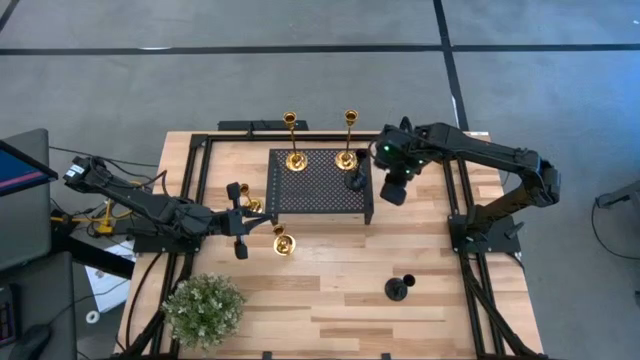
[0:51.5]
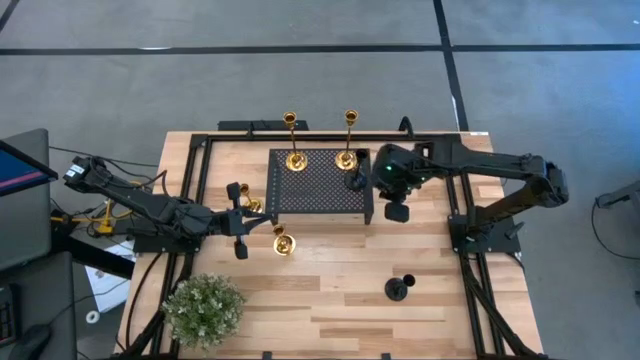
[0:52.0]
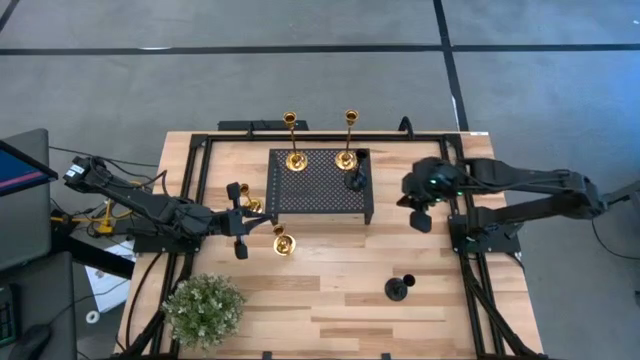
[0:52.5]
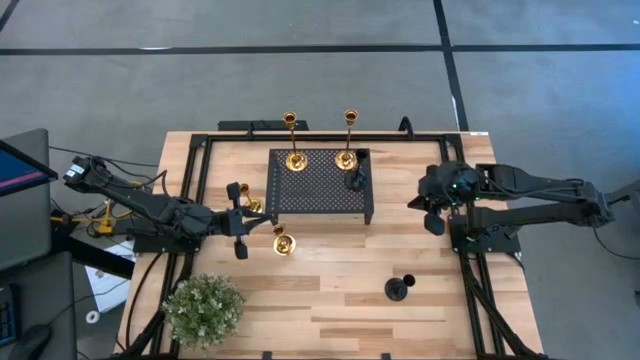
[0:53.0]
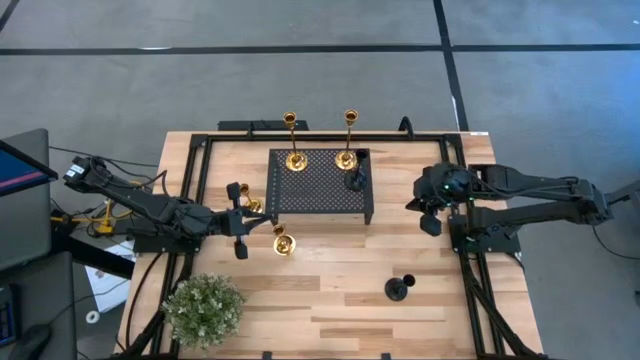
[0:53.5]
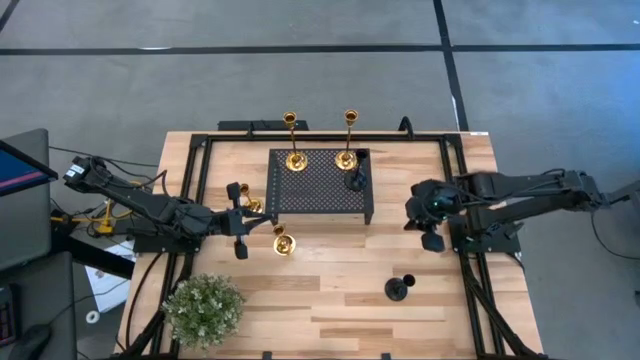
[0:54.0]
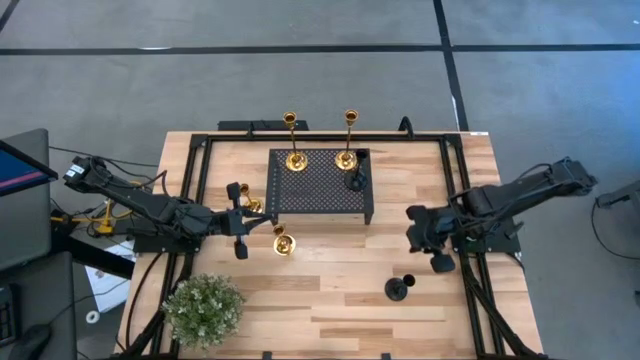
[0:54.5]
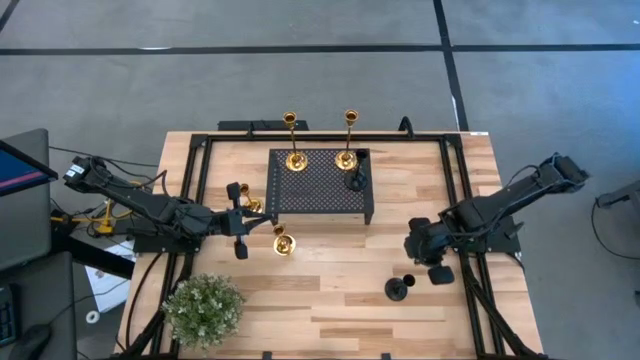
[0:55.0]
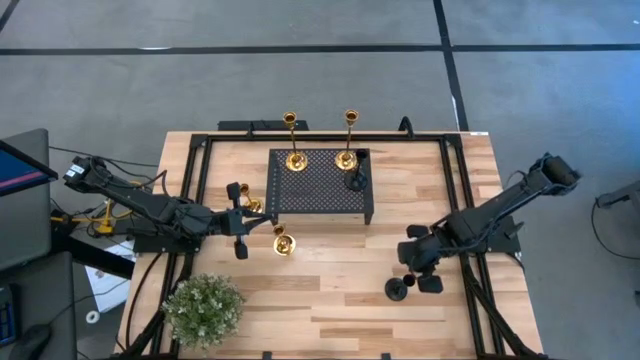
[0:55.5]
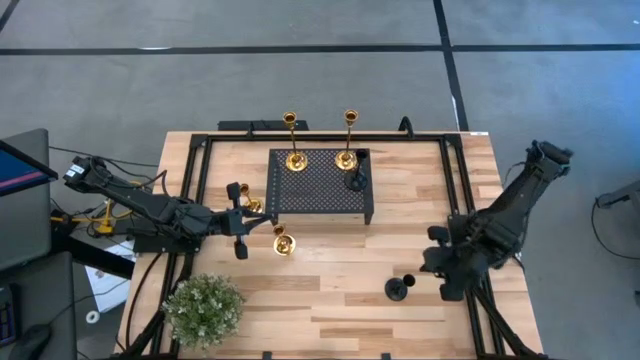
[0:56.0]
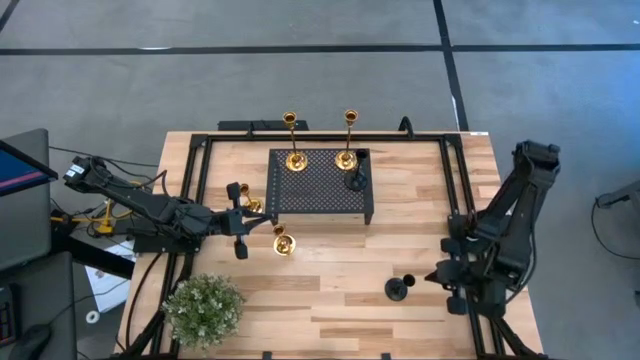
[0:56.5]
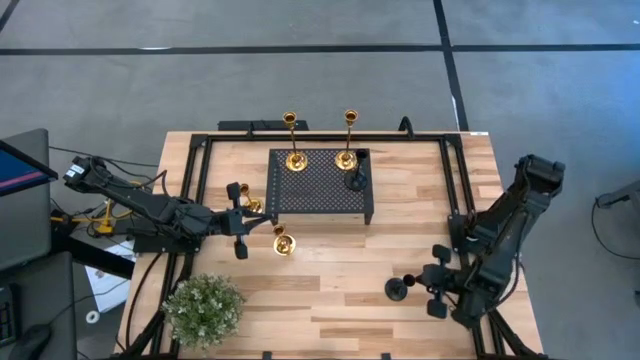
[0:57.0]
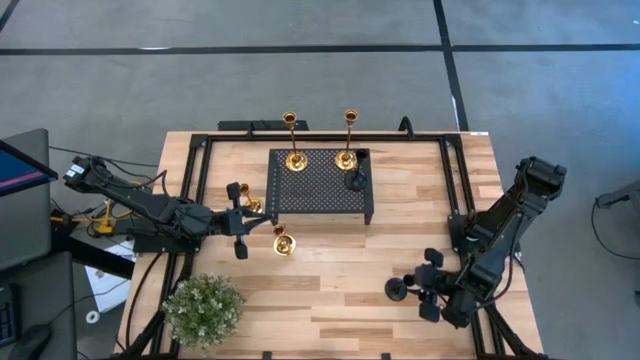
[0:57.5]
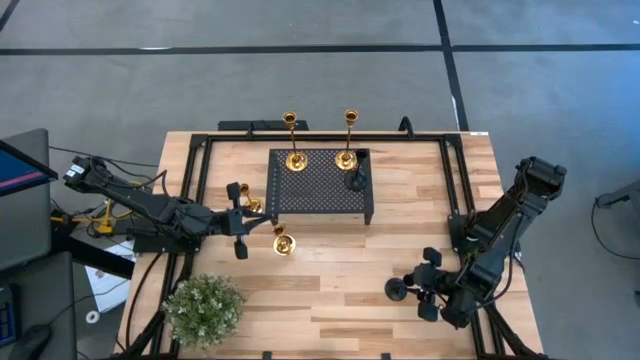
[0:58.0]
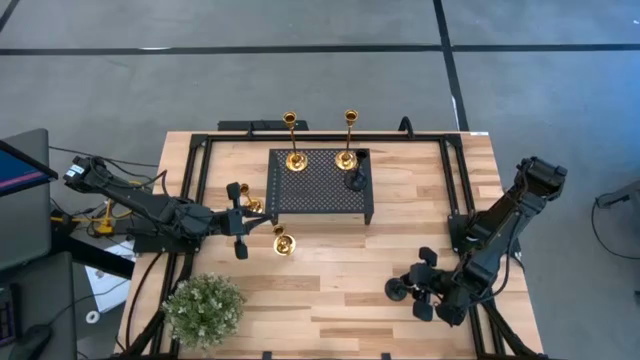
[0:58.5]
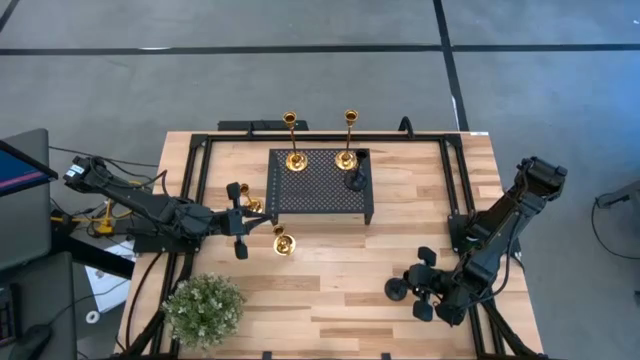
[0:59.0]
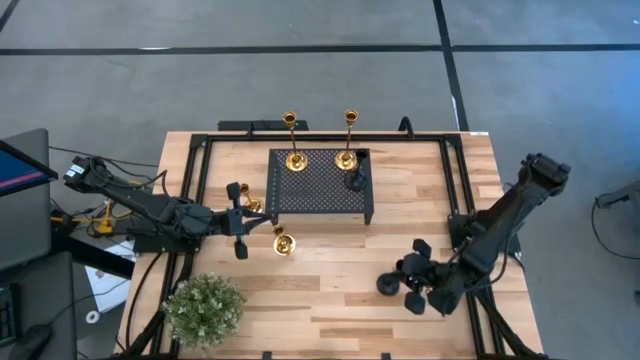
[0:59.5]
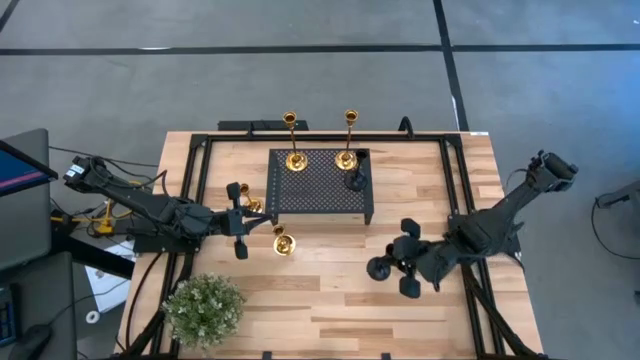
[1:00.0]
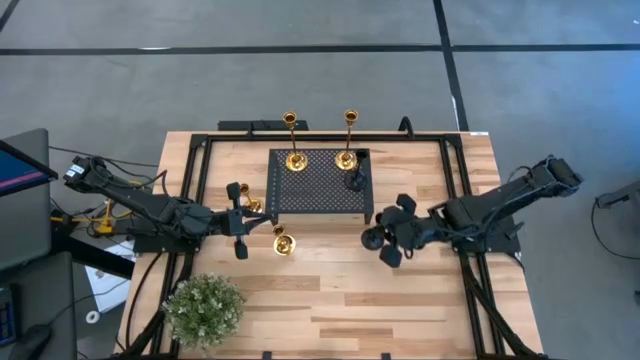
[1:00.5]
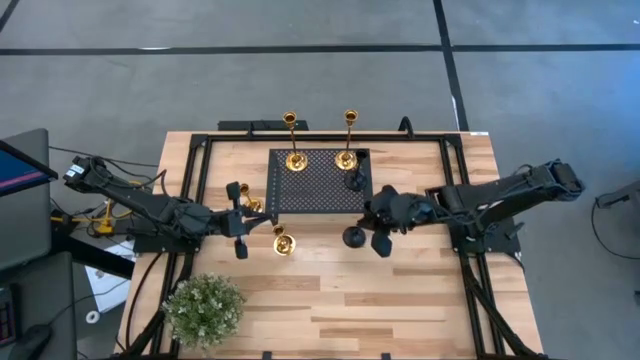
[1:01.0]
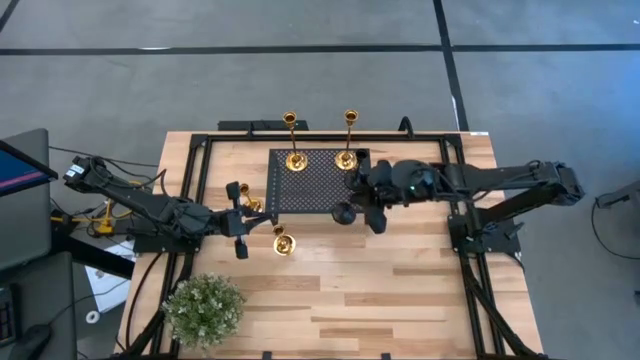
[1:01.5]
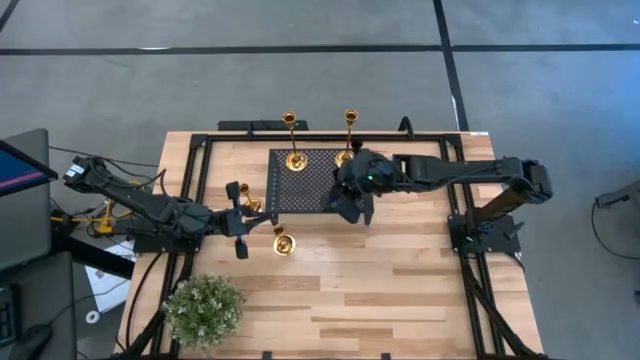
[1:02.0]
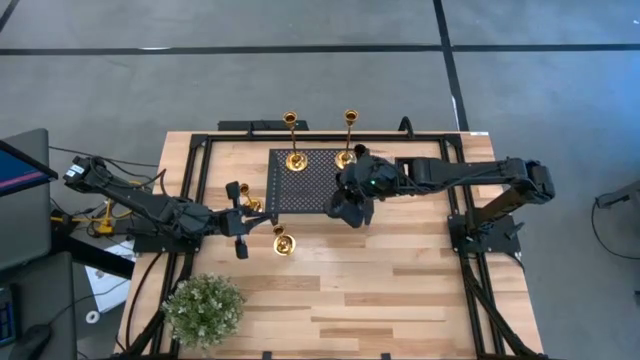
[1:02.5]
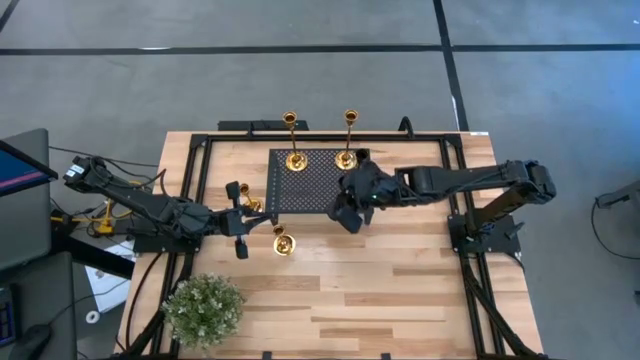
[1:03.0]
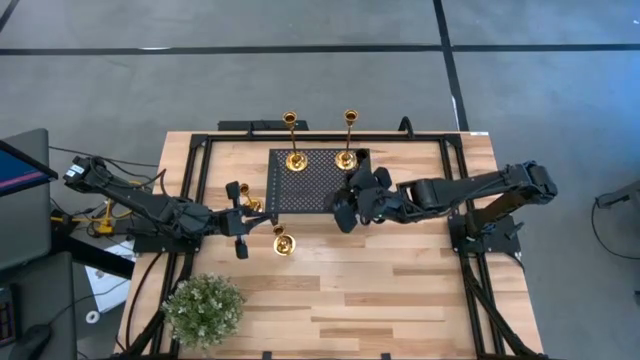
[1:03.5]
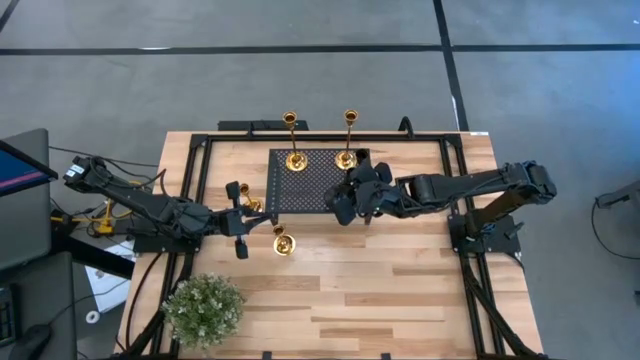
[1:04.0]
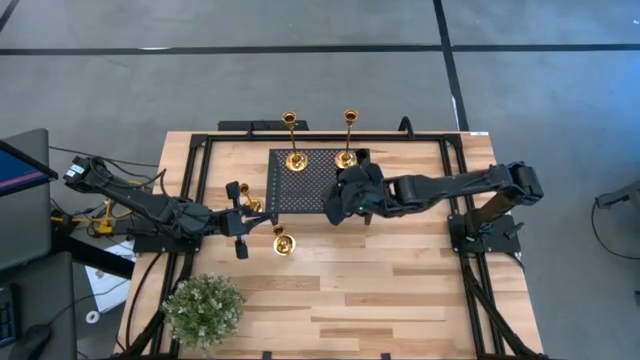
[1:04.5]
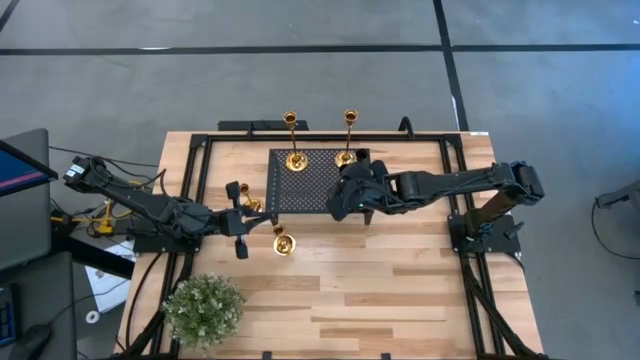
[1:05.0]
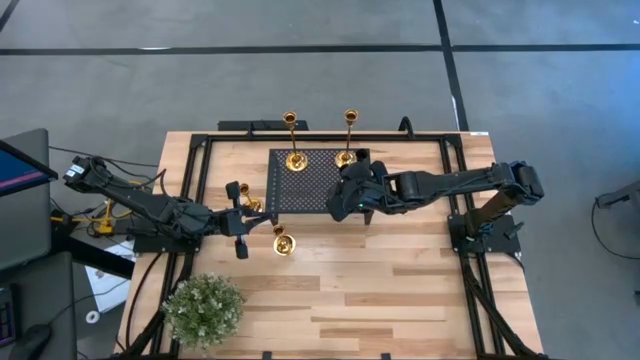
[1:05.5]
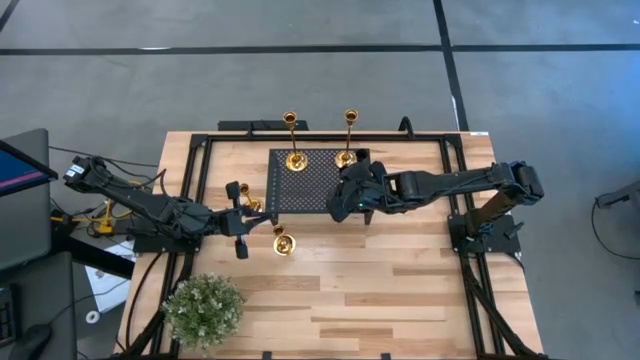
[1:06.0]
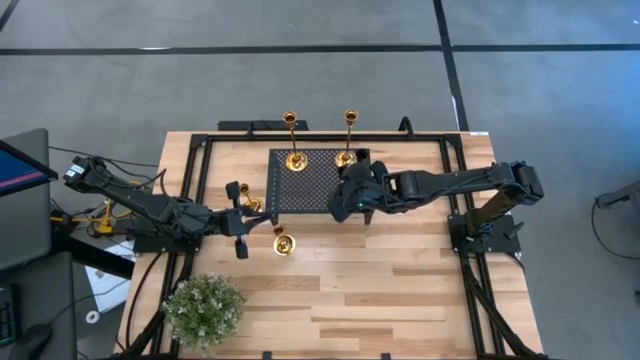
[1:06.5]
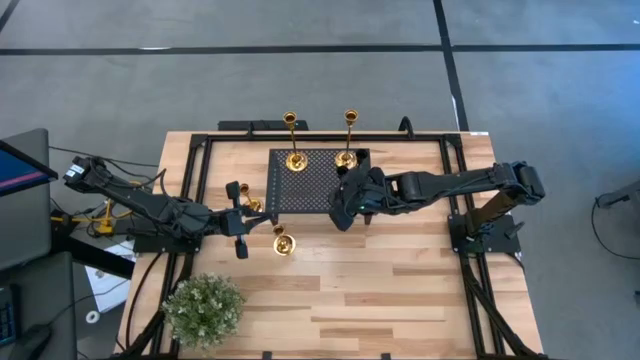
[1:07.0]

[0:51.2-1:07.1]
Task: Pick & Place candle stick holders
Put the black candle holder on the shelf

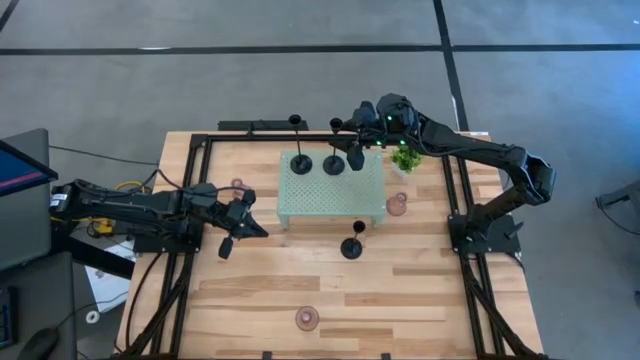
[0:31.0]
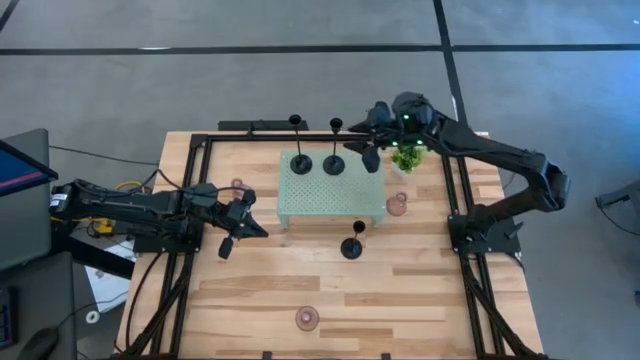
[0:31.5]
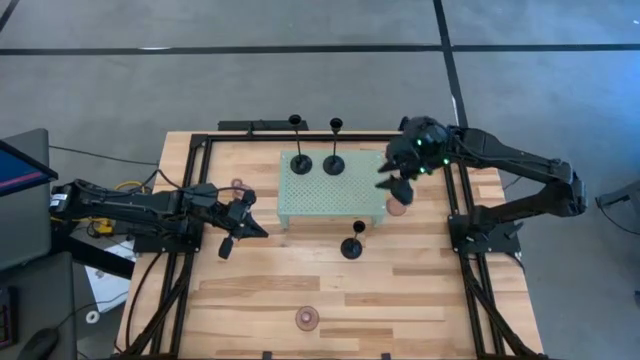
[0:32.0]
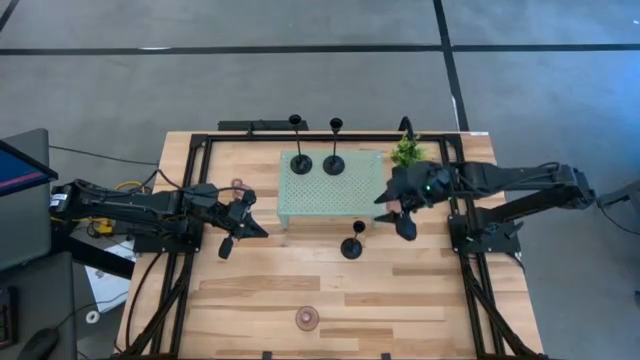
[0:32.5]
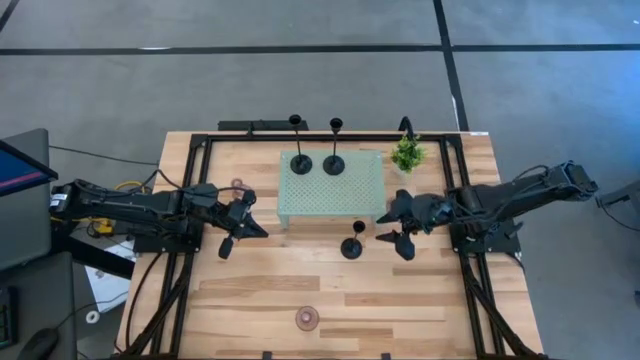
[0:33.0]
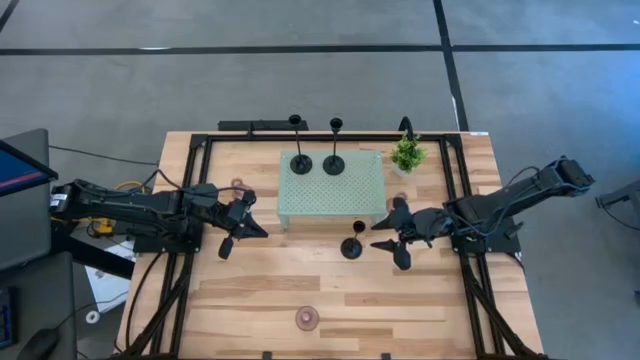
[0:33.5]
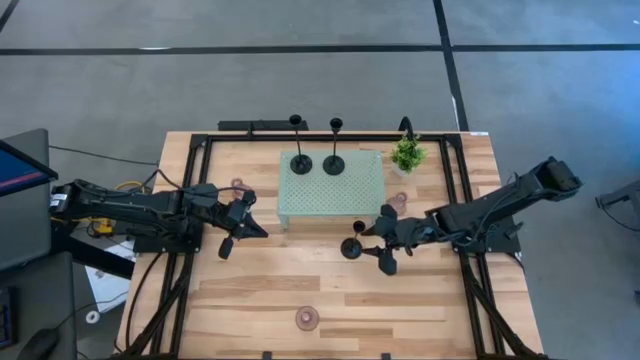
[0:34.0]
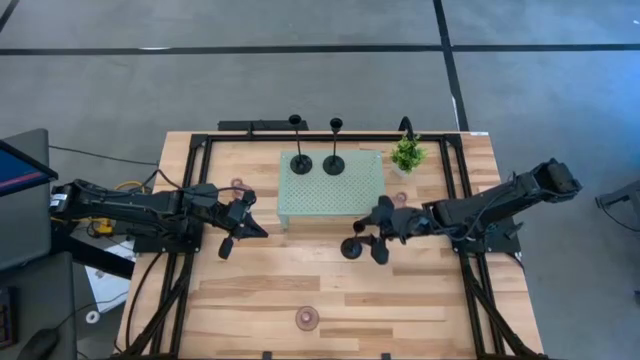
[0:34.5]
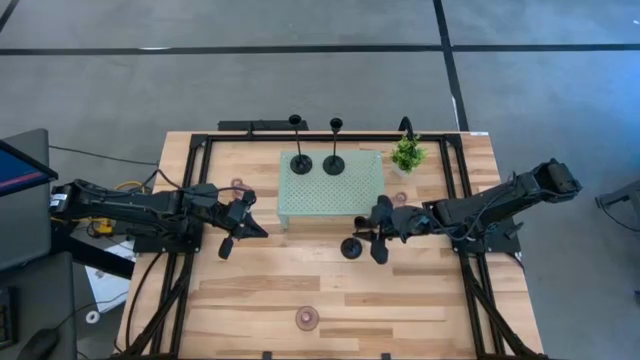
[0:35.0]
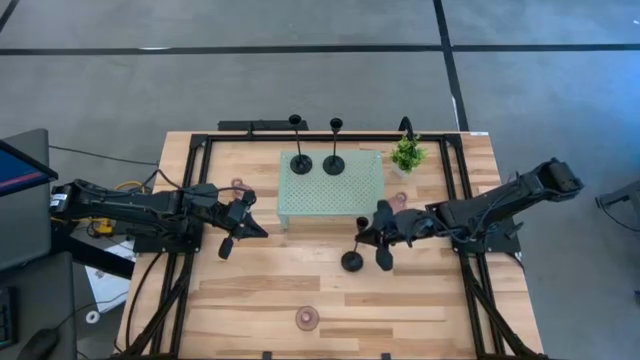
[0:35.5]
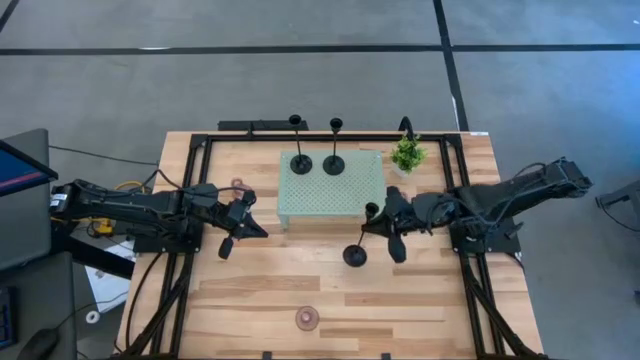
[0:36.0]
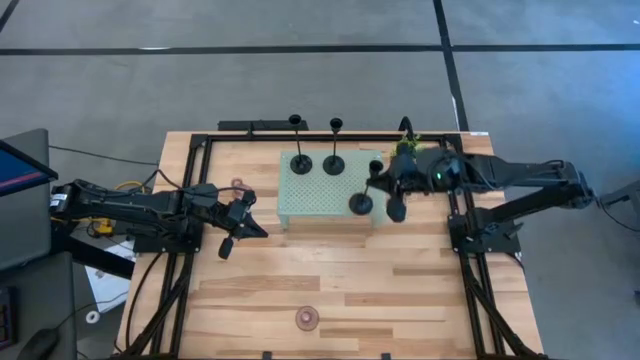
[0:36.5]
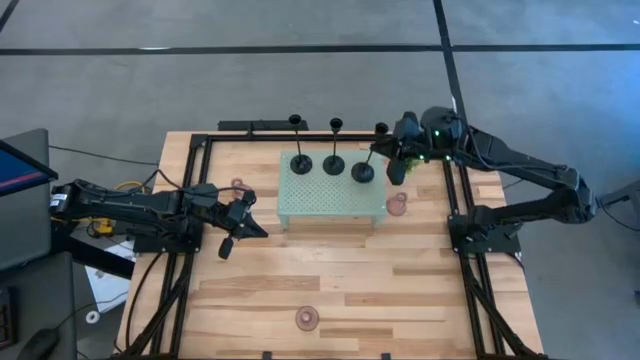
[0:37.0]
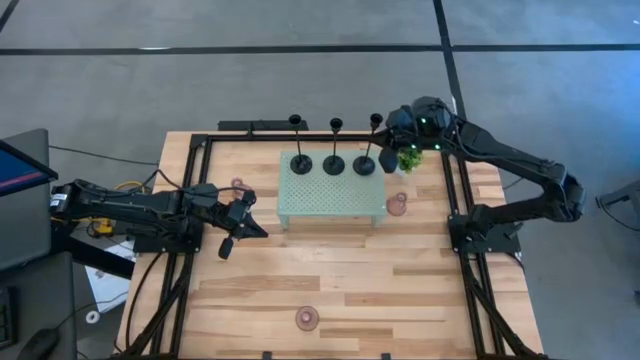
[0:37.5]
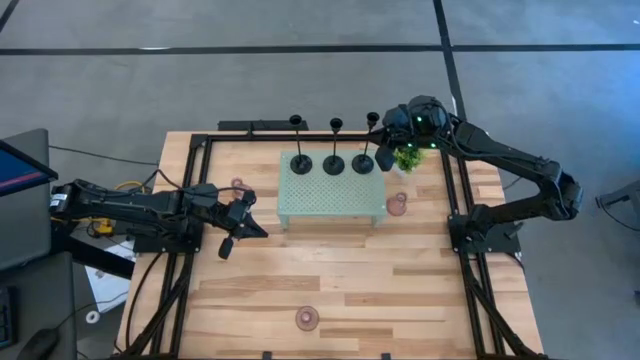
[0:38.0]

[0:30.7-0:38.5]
Task: Pick & Place candle stick holders
Put the black candle holder on the shelf
